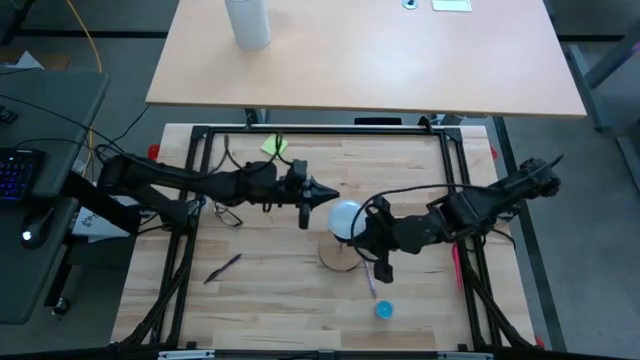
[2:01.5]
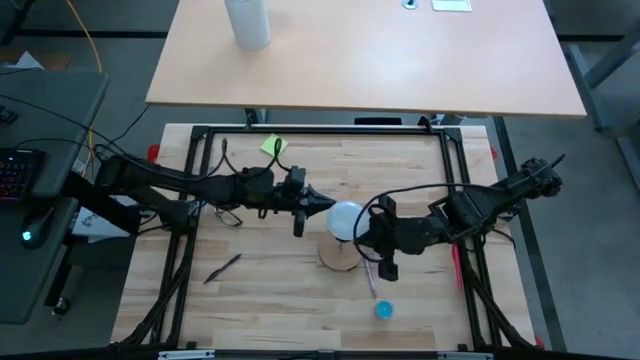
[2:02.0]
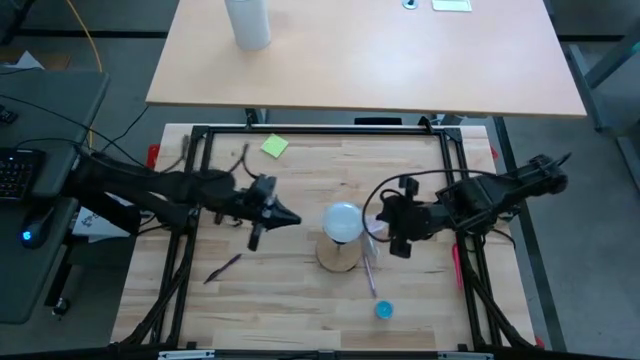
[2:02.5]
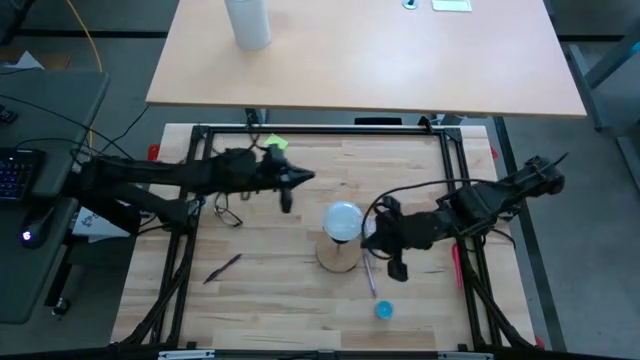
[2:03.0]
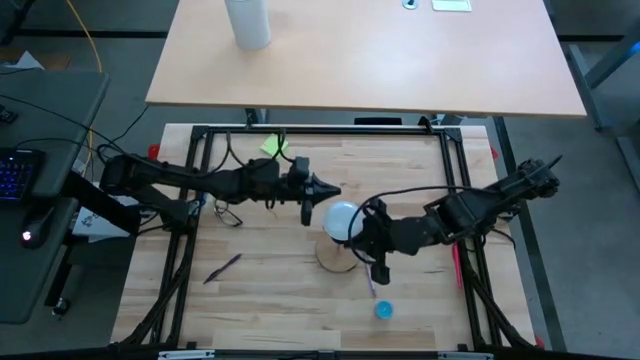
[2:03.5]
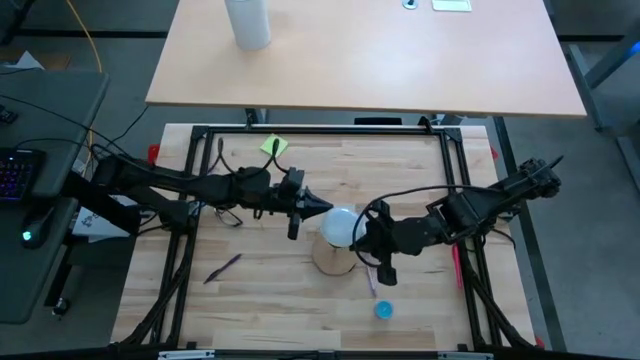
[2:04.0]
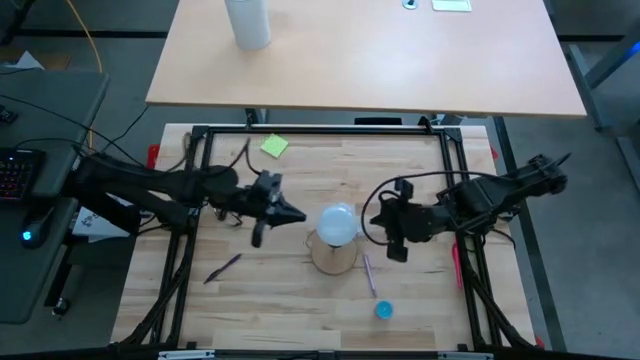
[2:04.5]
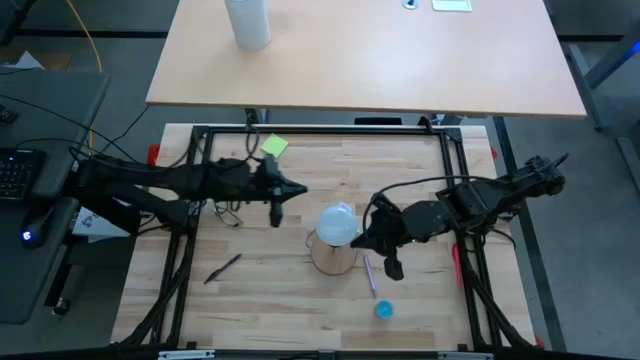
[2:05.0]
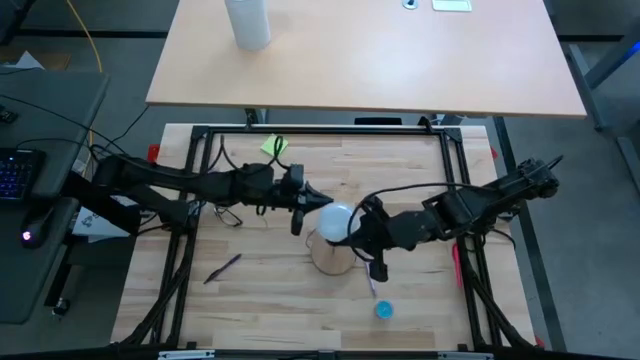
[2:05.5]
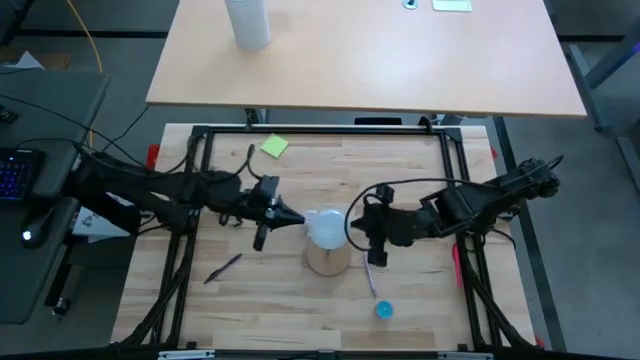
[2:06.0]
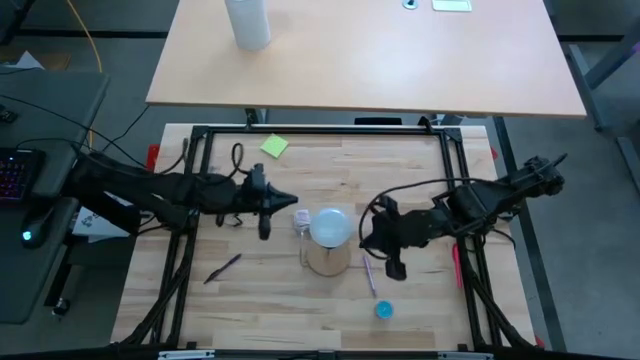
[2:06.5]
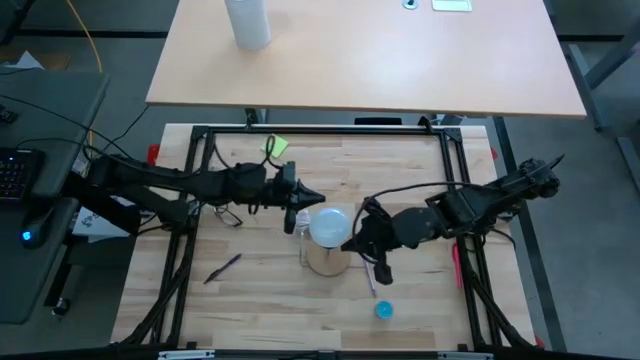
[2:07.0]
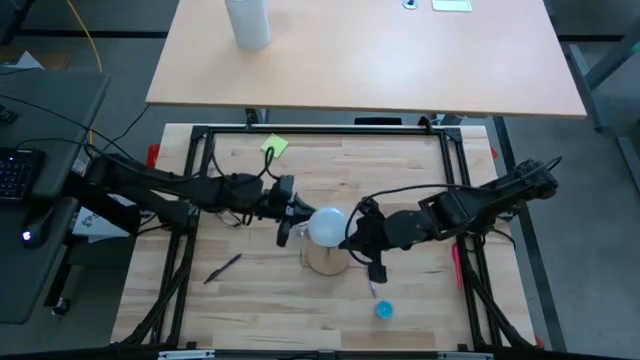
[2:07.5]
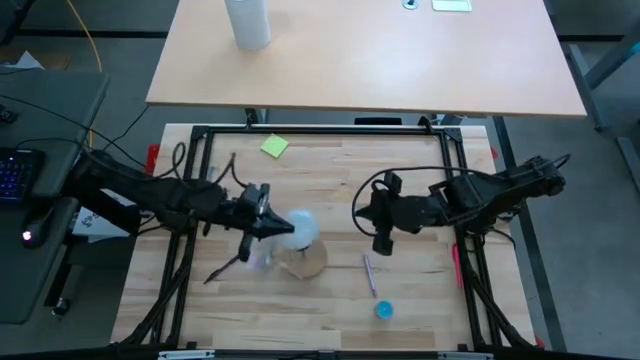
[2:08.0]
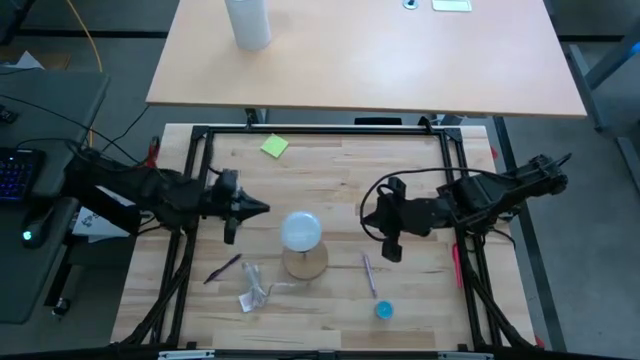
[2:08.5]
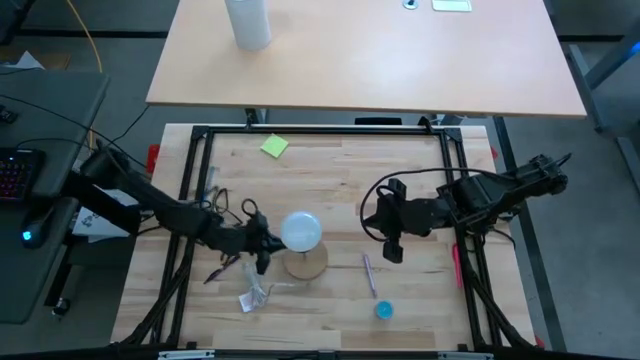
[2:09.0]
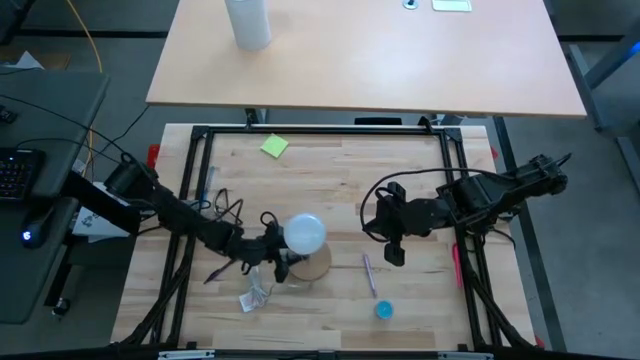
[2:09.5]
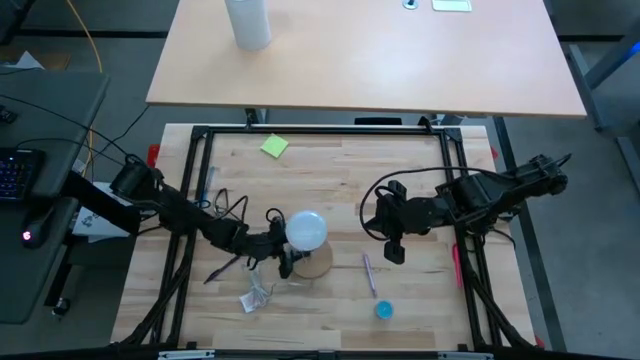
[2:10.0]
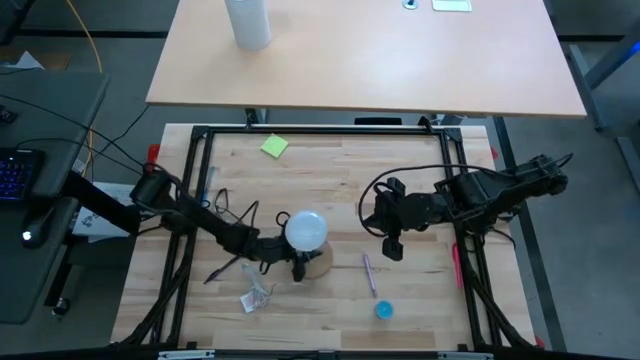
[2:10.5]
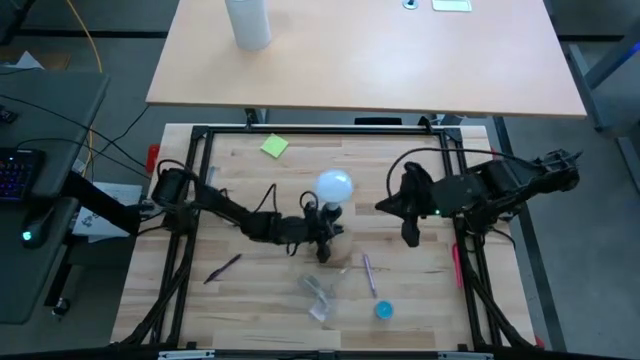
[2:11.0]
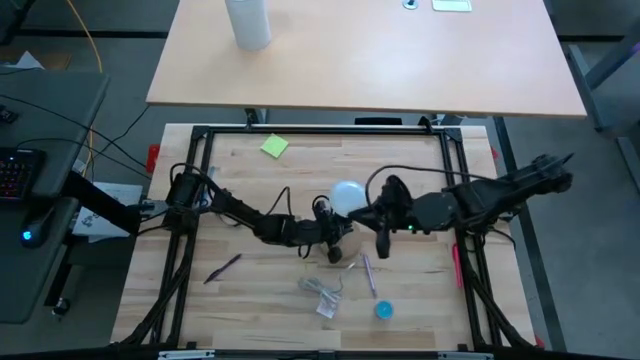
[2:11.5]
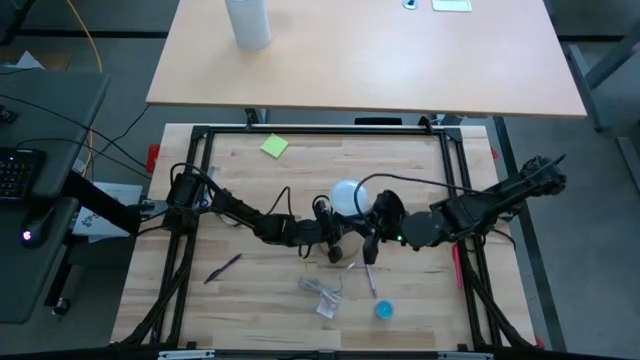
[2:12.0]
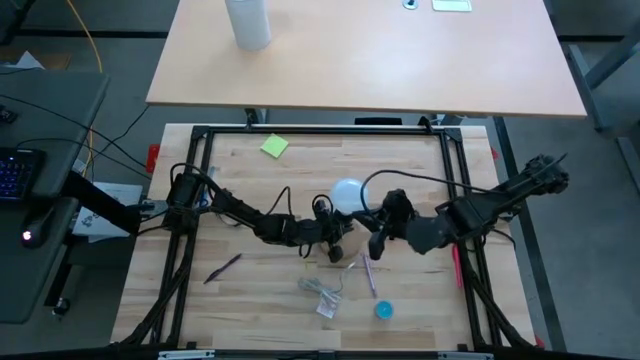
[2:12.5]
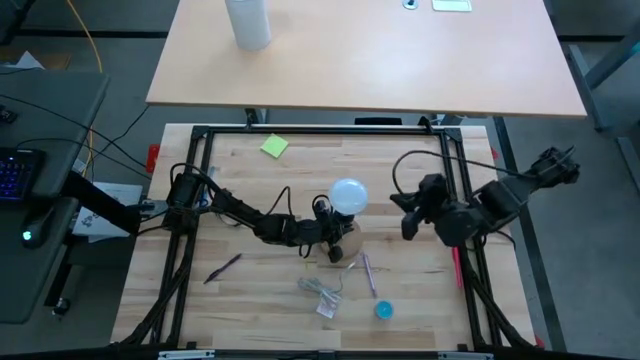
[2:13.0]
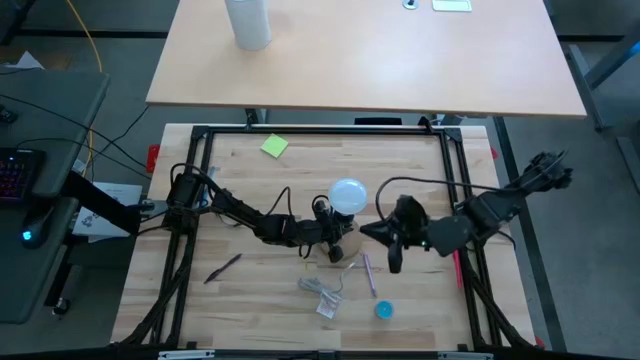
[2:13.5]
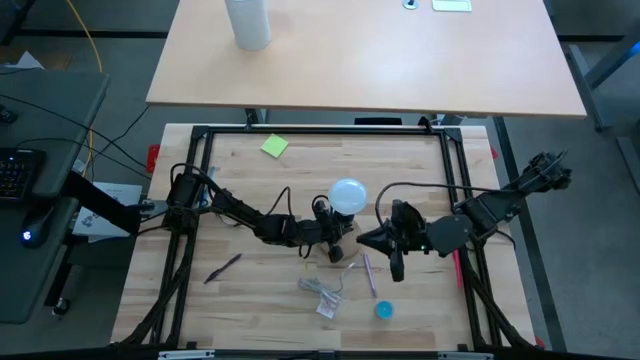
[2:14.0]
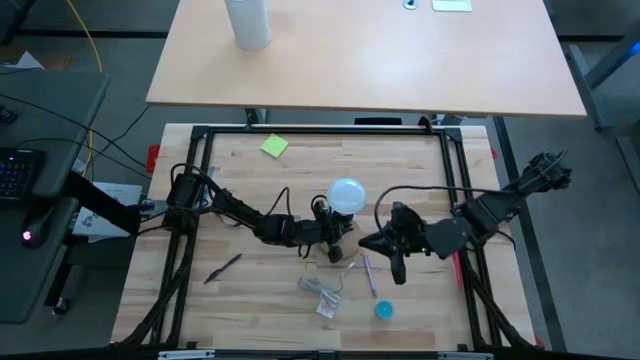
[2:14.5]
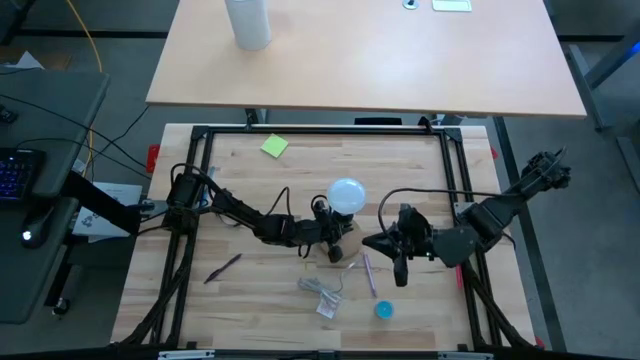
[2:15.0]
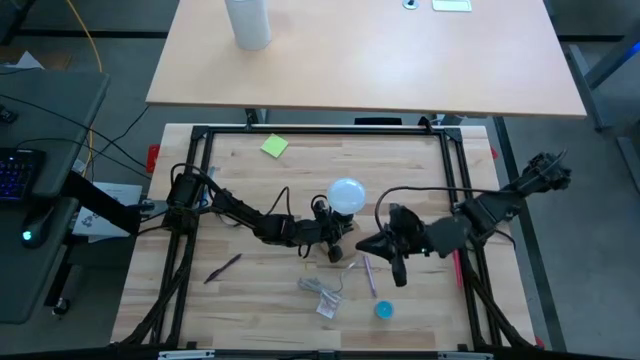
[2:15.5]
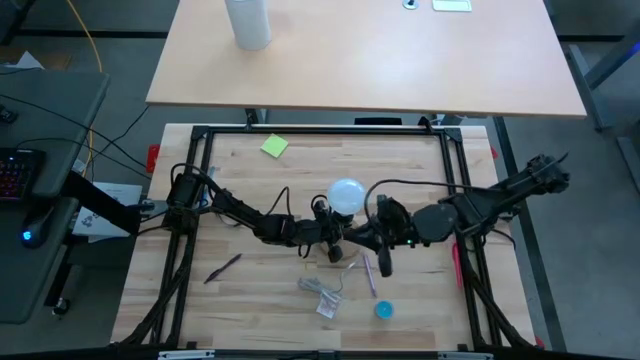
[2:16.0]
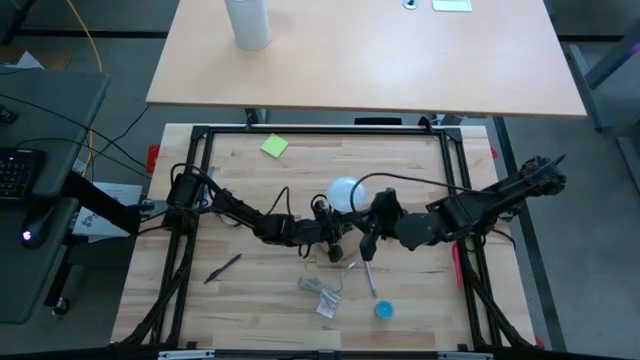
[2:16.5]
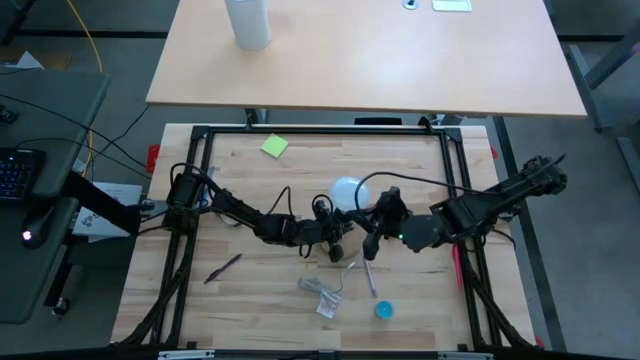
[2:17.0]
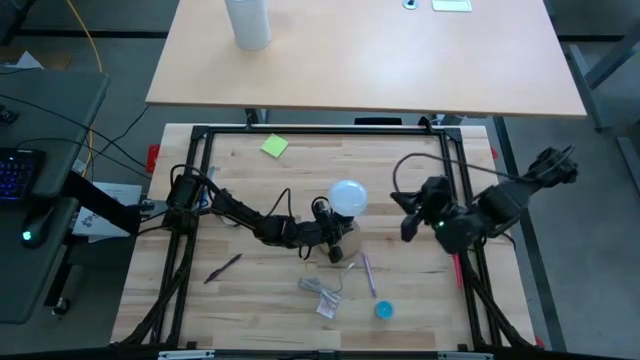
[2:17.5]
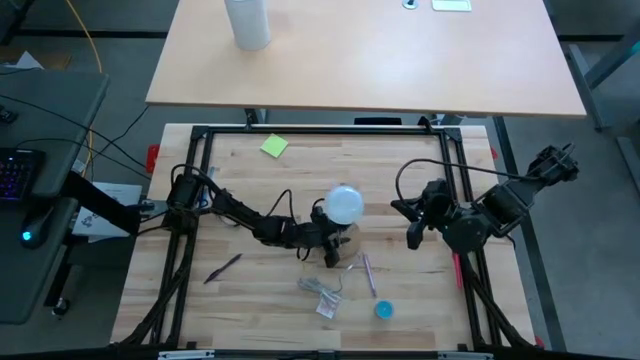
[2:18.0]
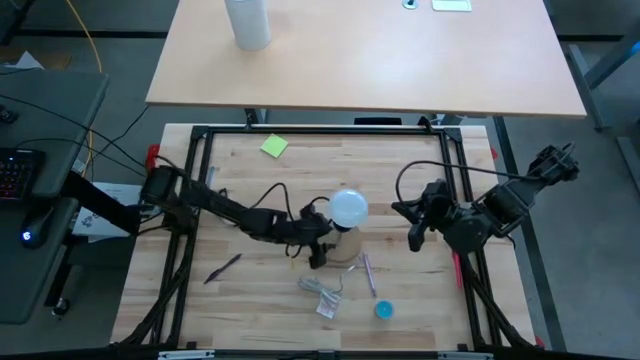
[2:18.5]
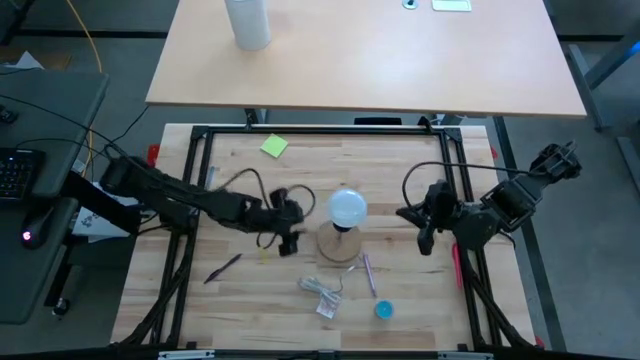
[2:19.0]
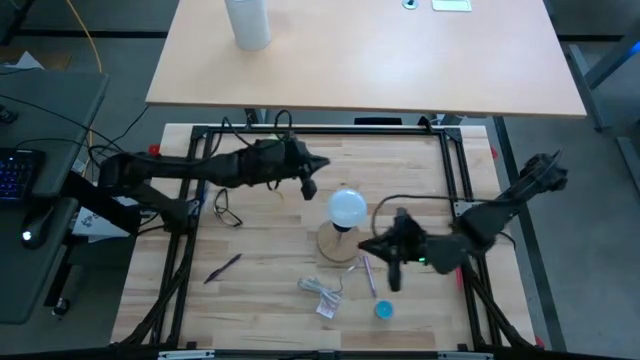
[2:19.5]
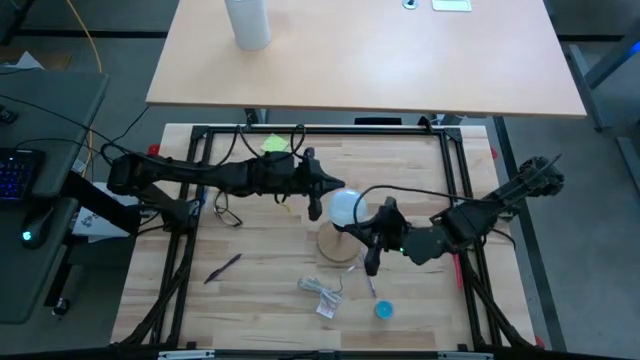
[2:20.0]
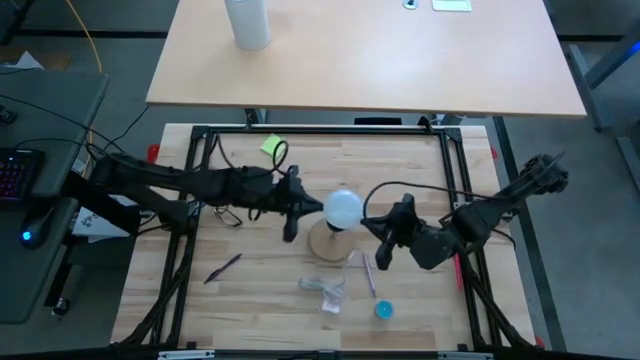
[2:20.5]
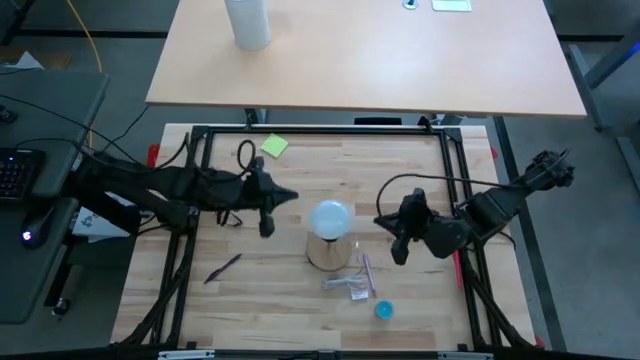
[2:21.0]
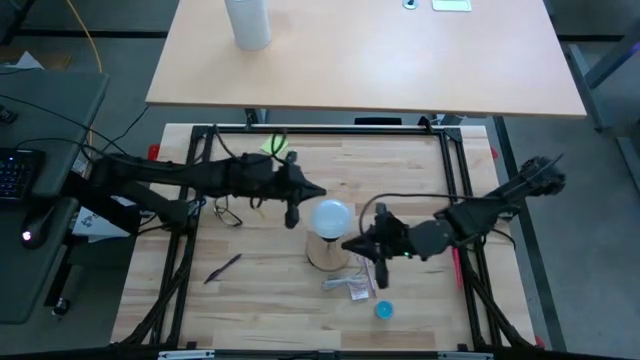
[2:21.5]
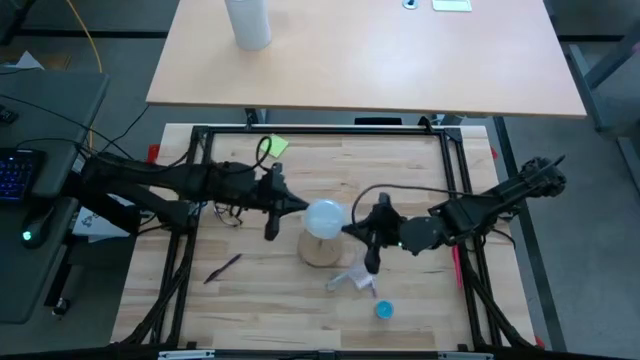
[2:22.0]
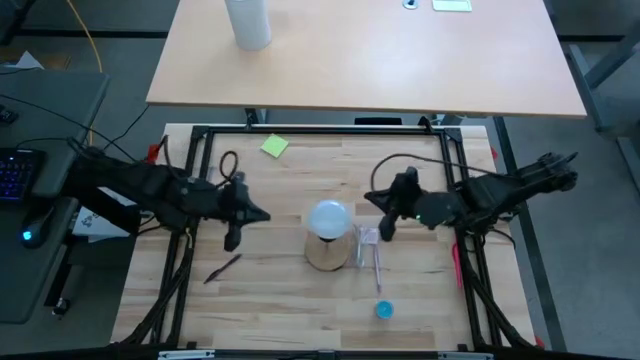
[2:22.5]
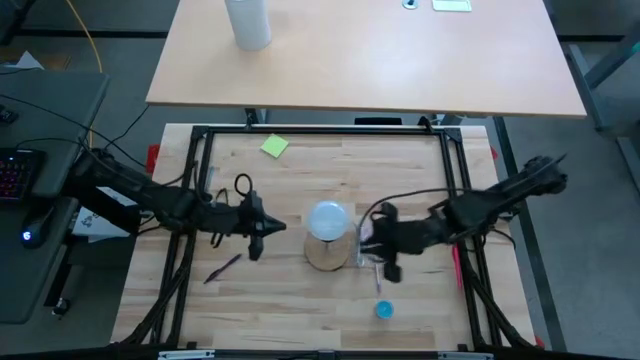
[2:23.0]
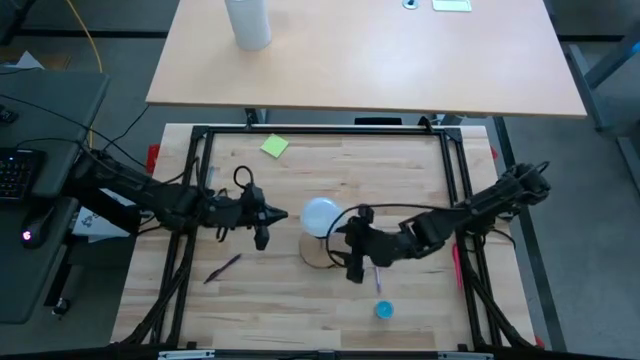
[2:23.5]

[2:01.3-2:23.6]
Task: Screw lightbulb
Remove the lightbulb from the lamp
